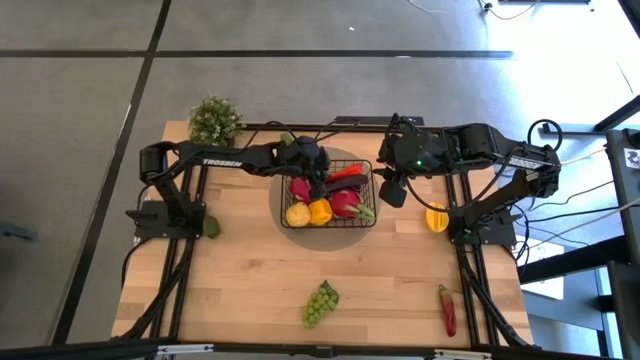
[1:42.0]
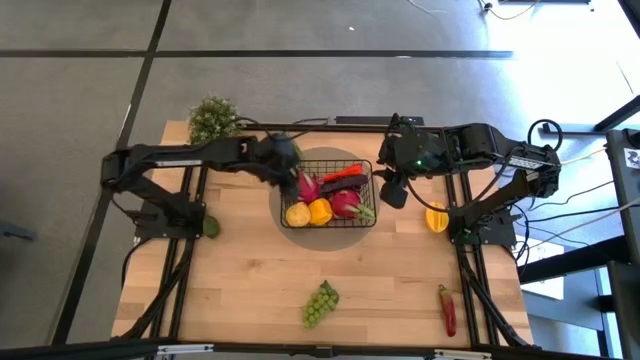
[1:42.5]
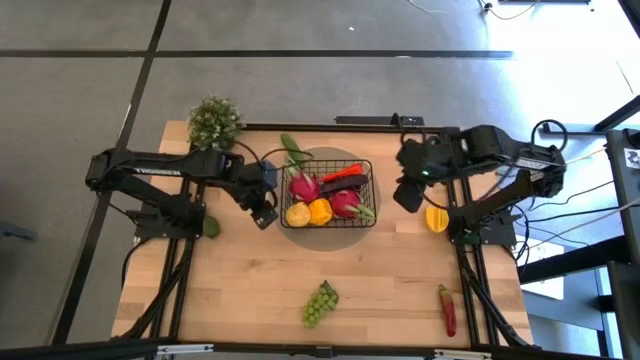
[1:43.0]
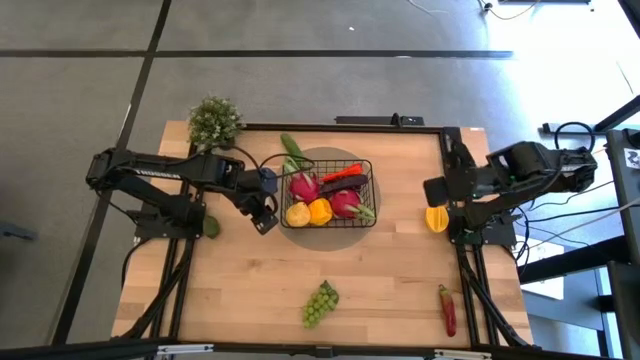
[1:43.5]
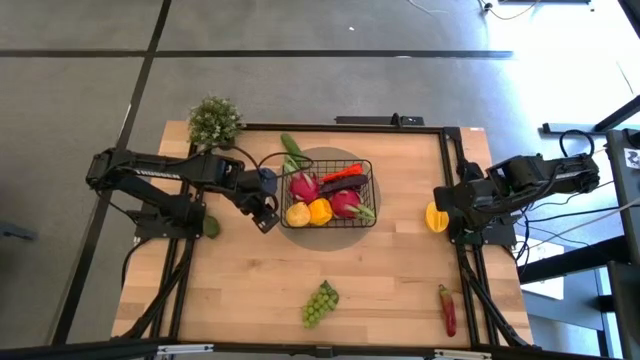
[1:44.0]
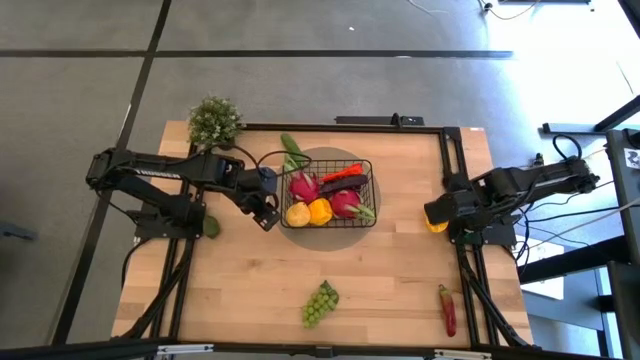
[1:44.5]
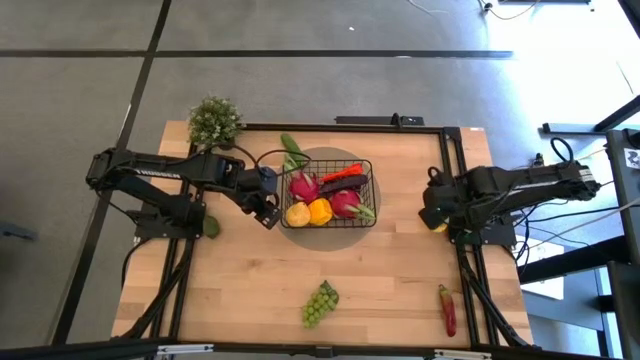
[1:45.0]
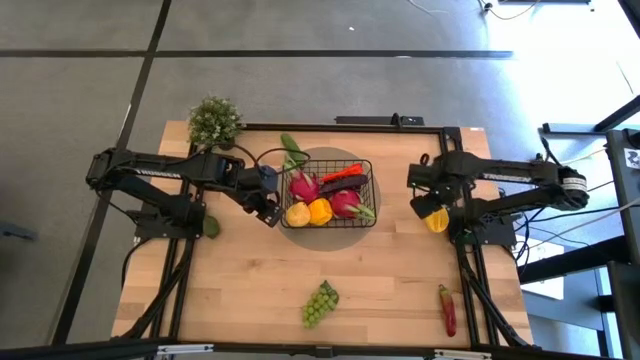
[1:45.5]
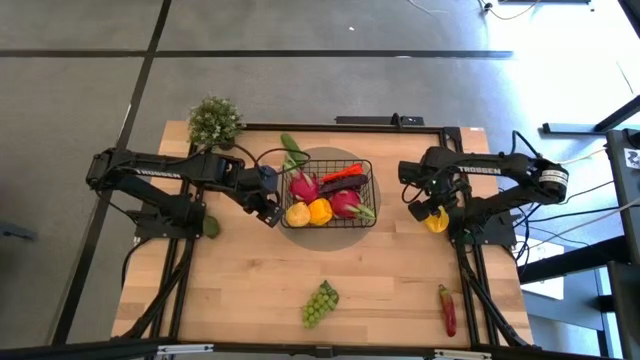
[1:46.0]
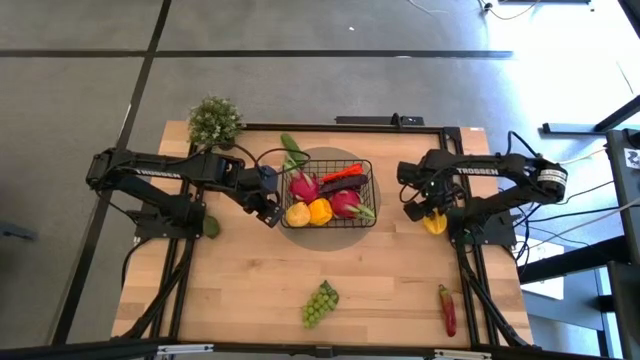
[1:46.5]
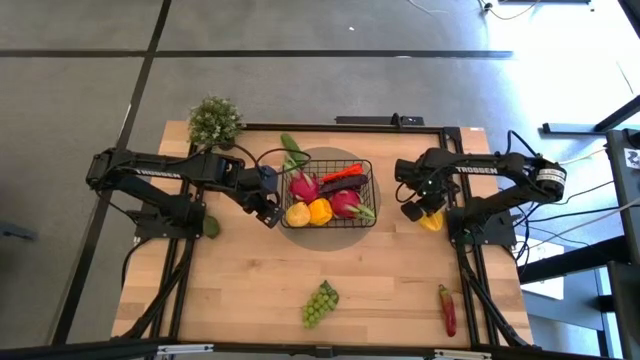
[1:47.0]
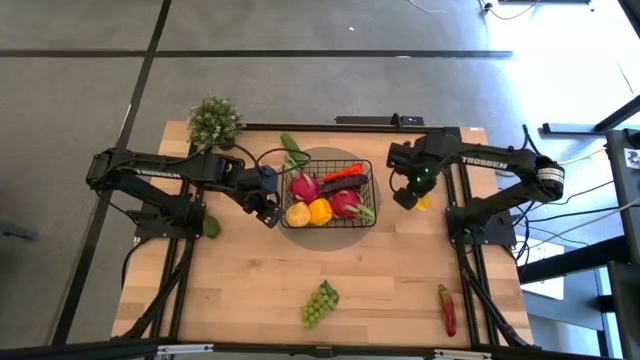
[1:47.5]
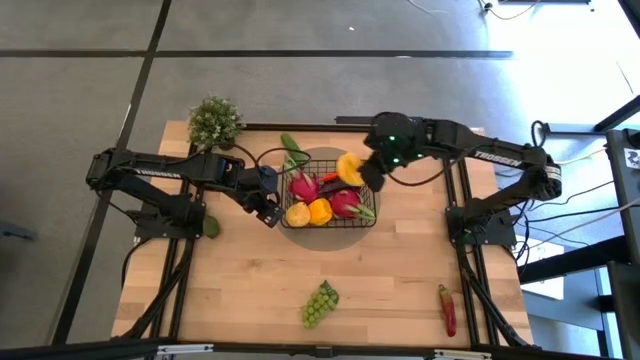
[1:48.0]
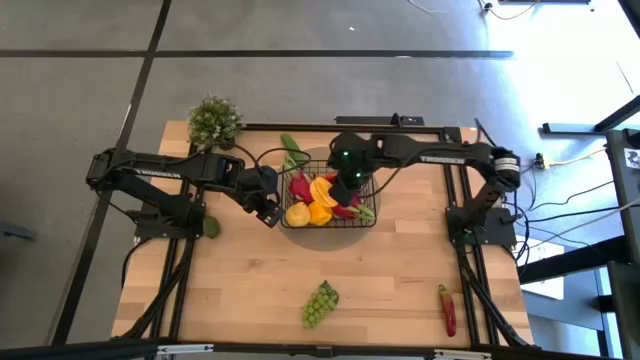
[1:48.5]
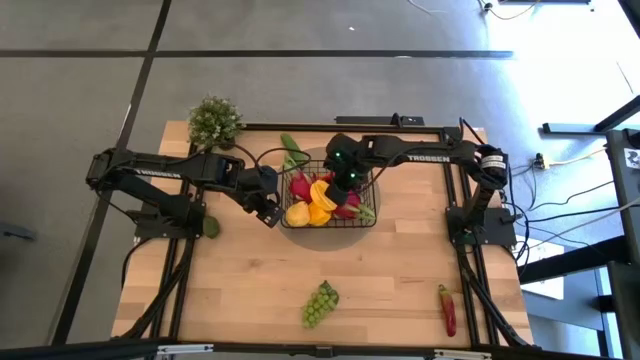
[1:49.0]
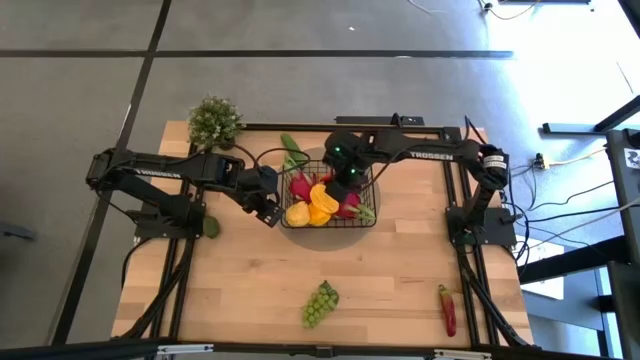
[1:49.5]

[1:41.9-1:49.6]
Task: Build produce basket
Put the yellow starfruit into the black wire basket

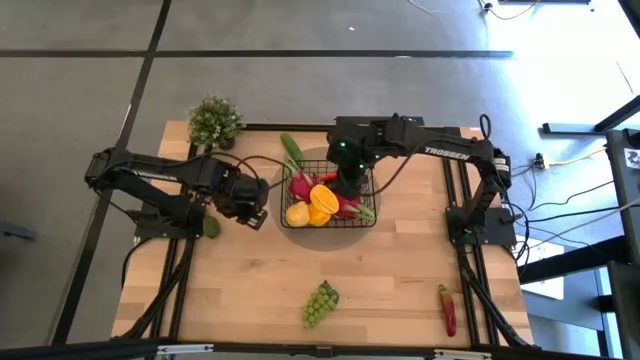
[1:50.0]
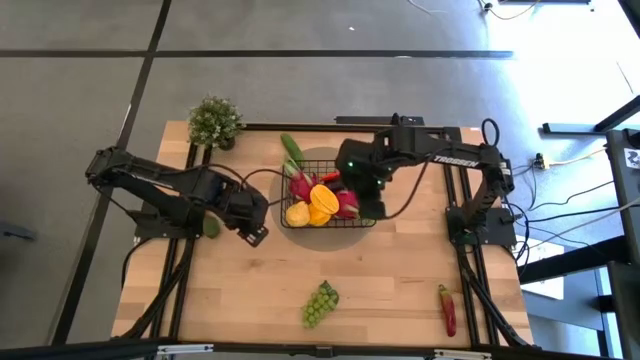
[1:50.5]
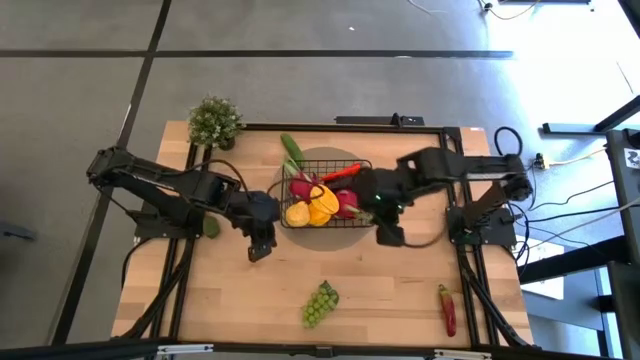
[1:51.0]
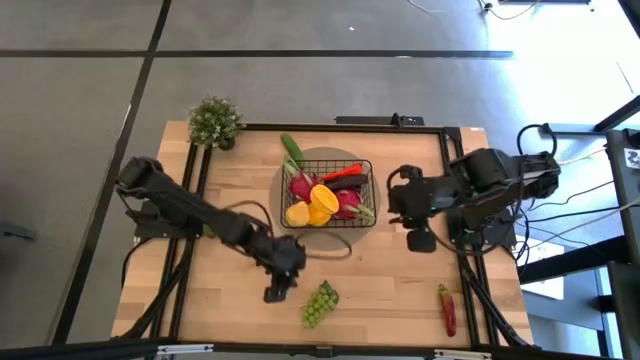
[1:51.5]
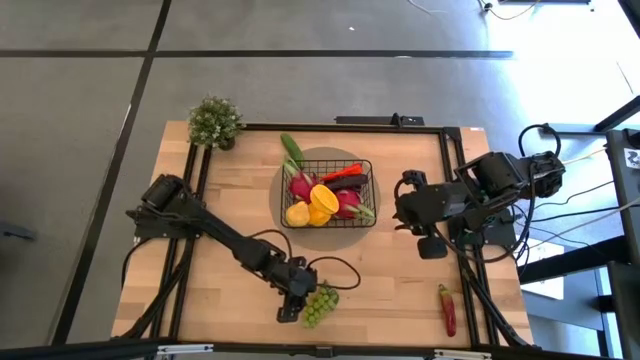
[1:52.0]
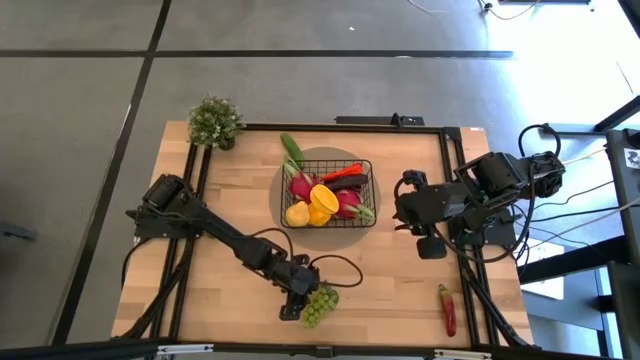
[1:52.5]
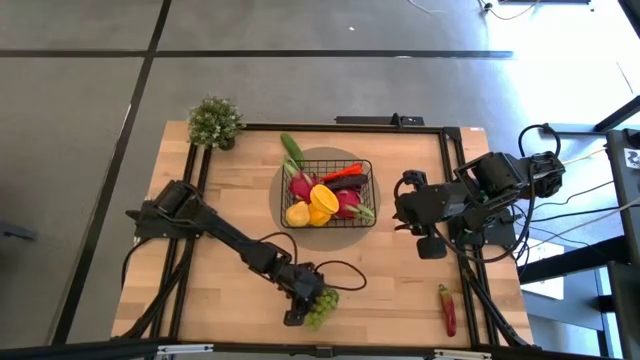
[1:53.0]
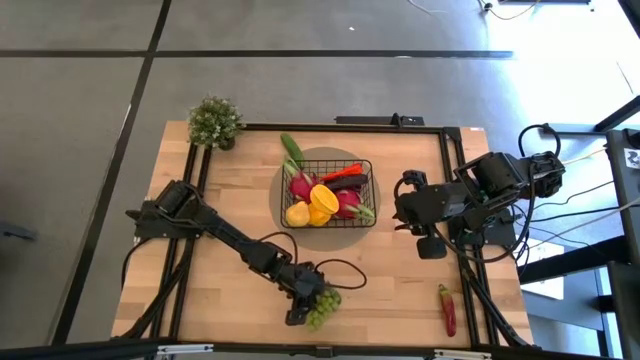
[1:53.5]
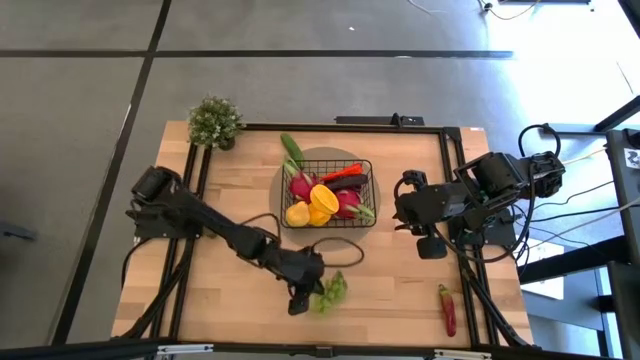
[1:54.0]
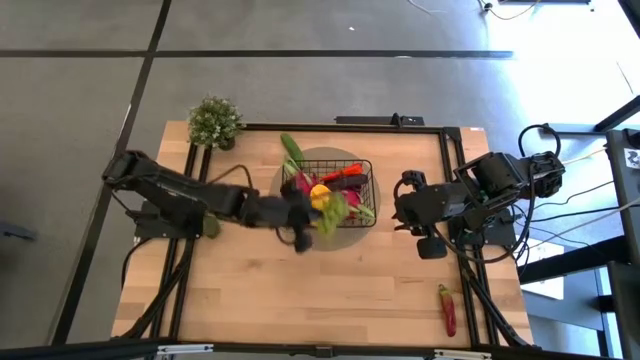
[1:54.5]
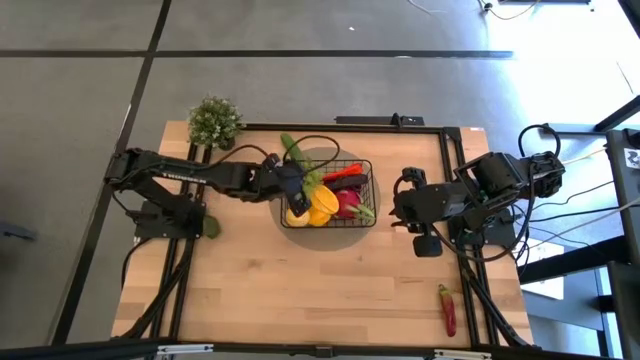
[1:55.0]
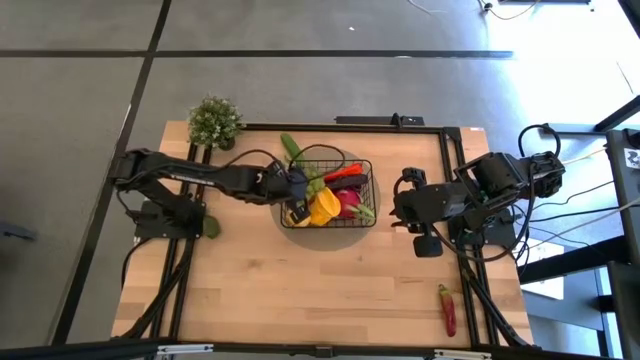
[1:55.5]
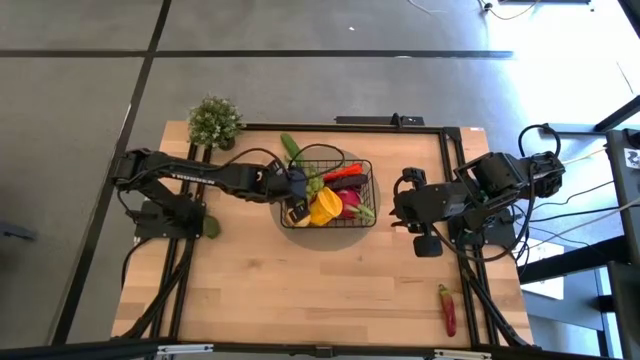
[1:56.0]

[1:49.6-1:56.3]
Put the green grapes into the black wire basket

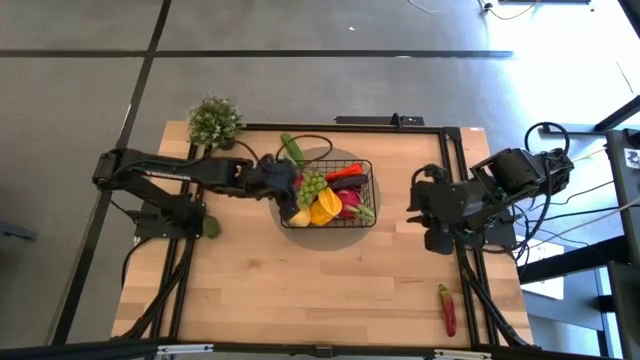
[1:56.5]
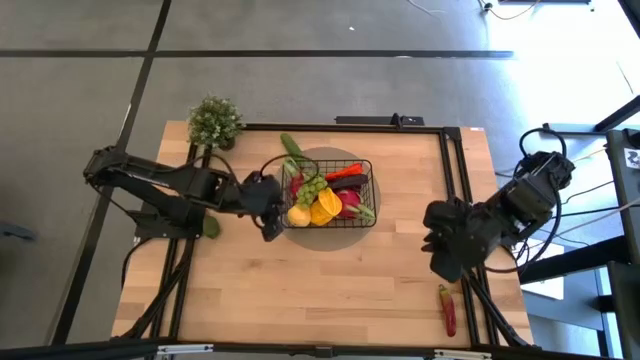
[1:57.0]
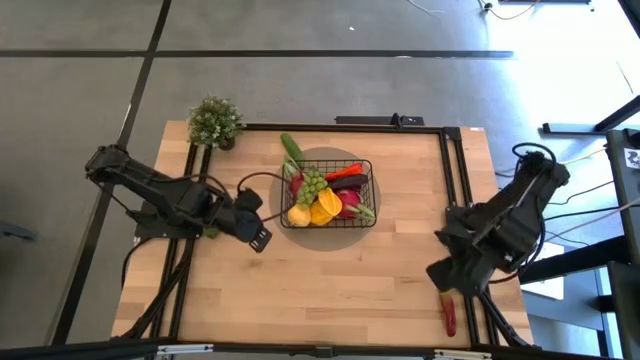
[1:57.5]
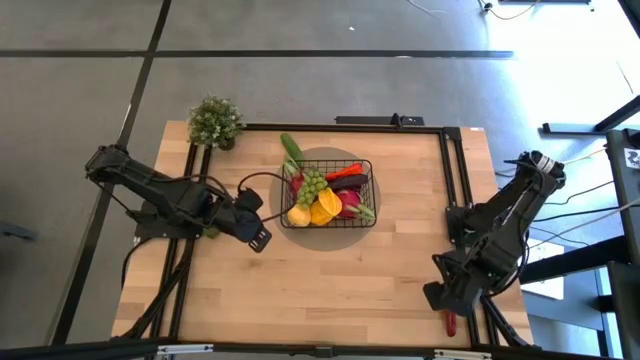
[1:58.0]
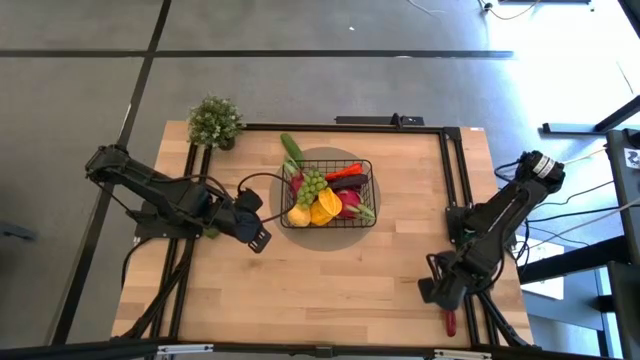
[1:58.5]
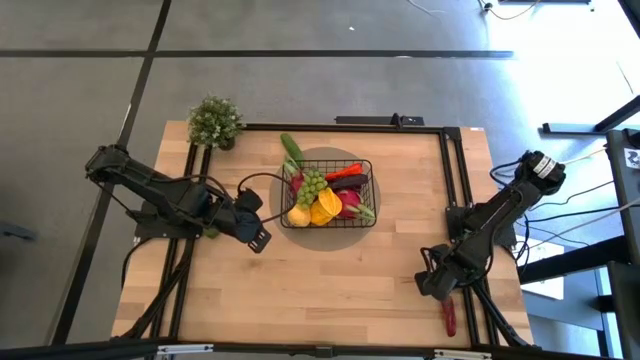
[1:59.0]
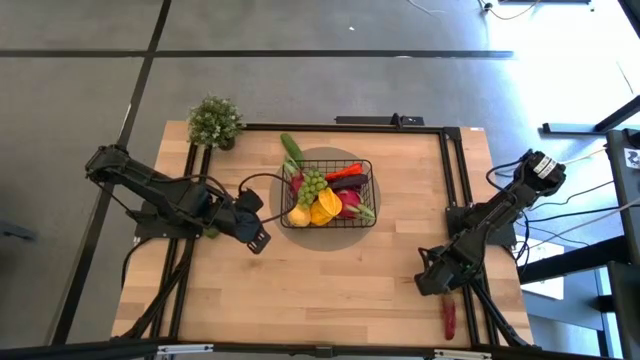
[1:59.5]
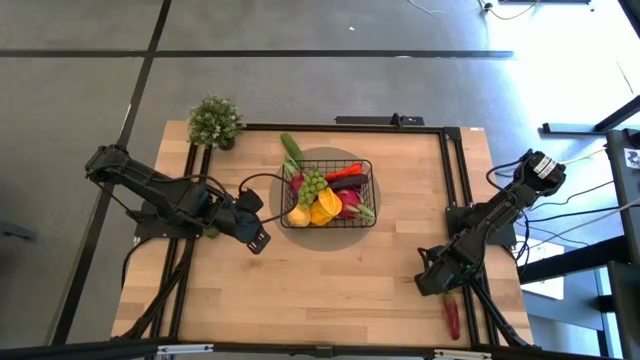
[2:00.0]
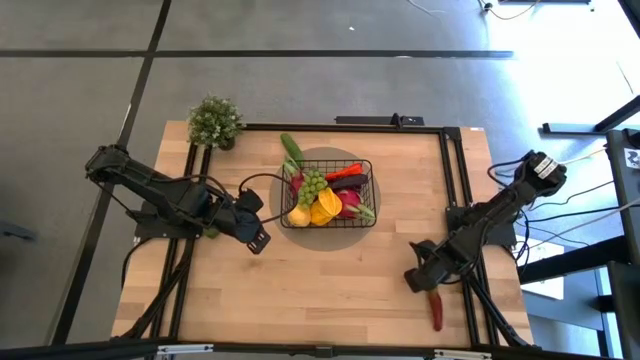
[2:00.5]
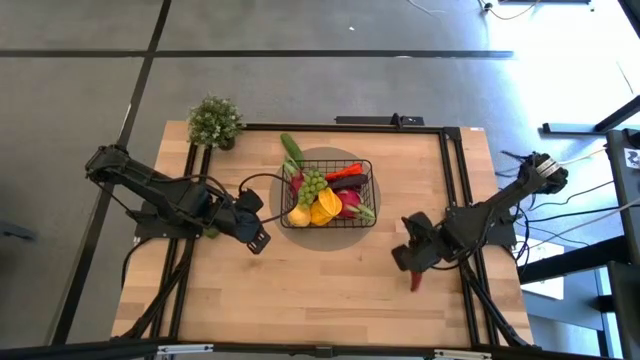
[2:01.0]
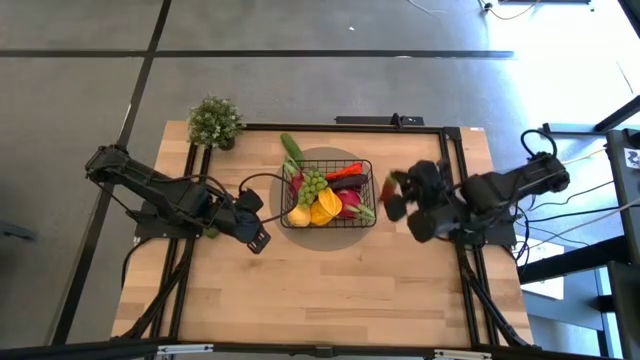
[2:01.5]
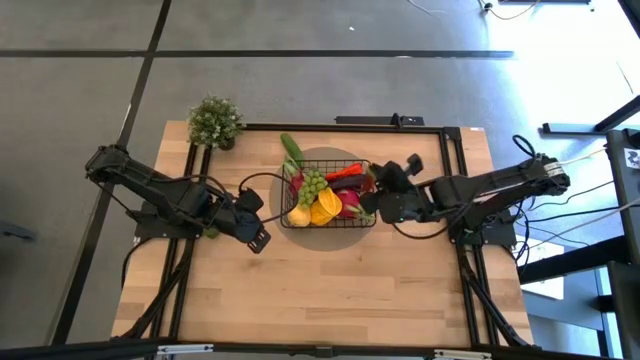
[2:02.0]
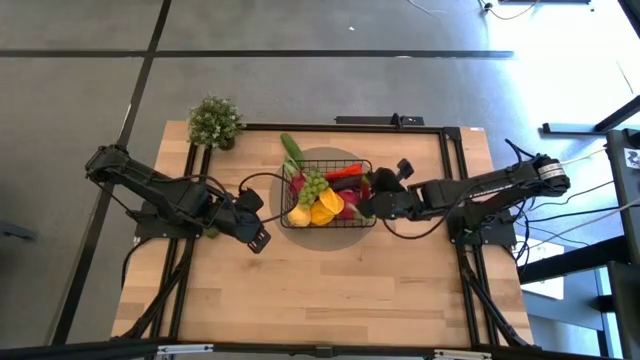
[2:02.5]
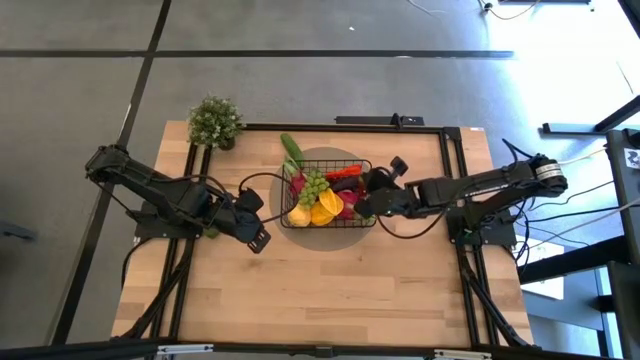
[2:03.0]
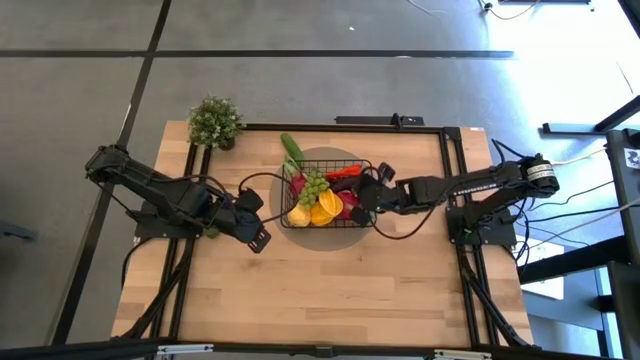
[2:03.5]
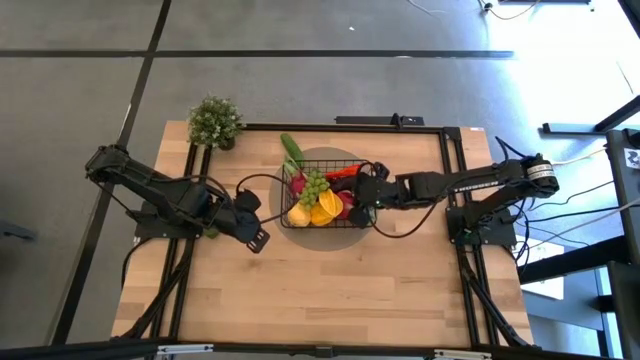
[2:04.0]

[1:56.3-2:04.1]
Put the red chili pepper into the black wire basket
